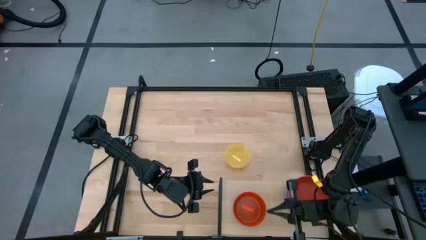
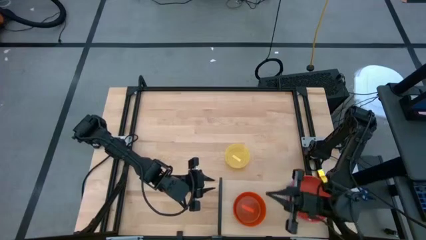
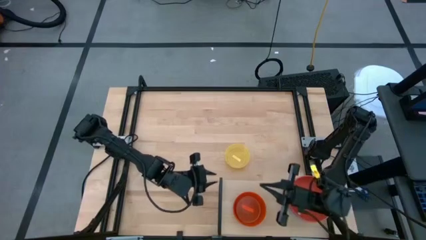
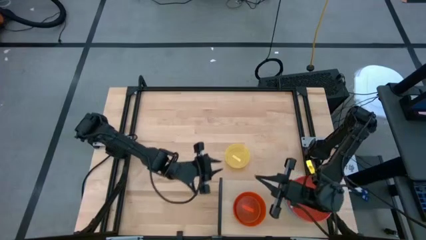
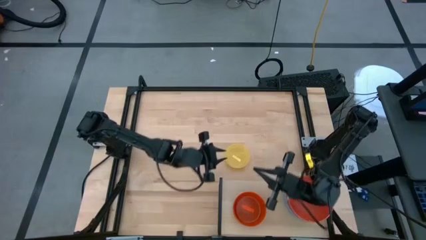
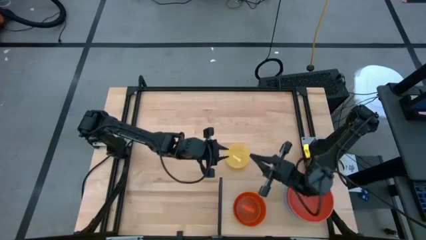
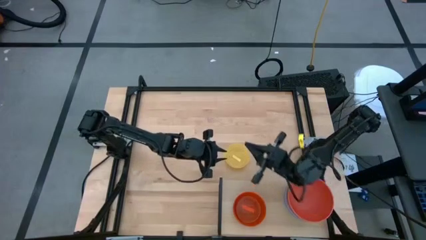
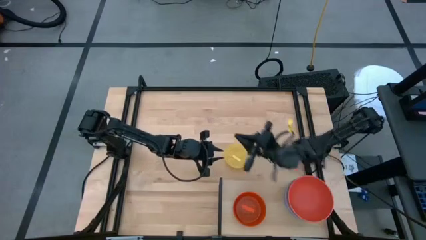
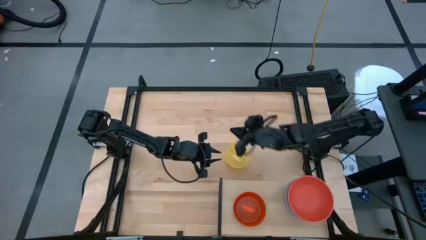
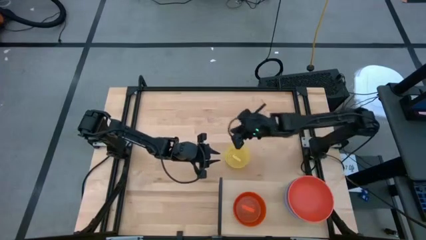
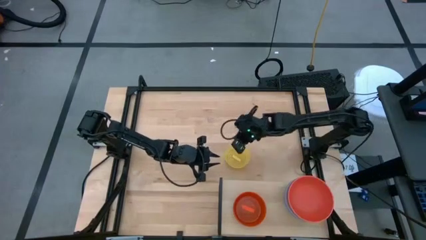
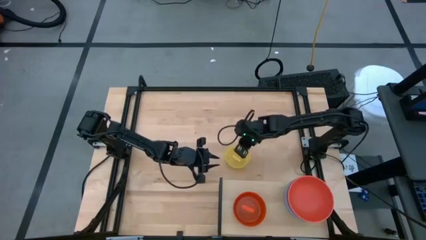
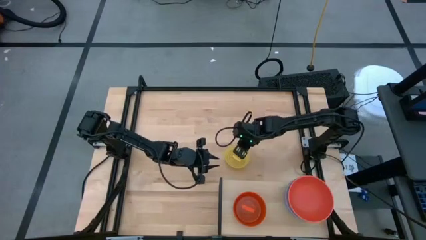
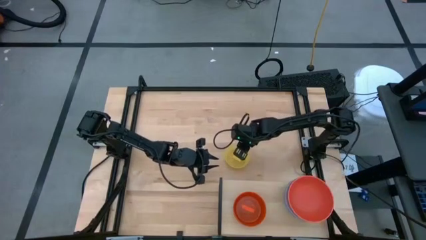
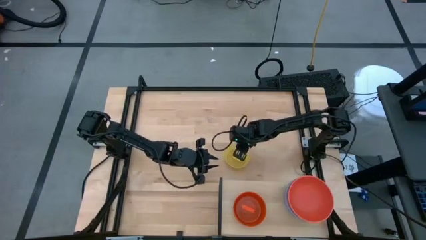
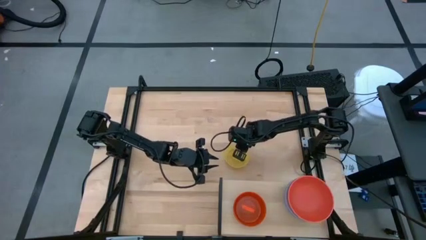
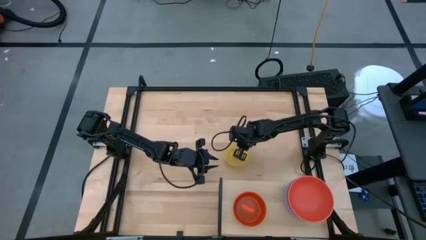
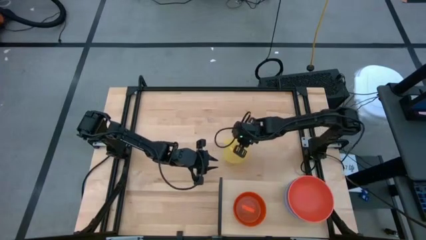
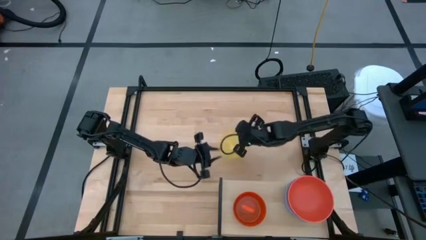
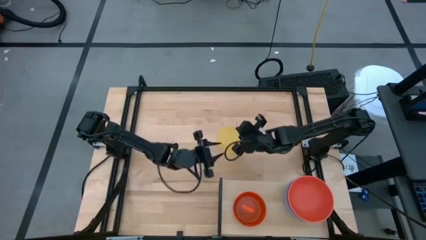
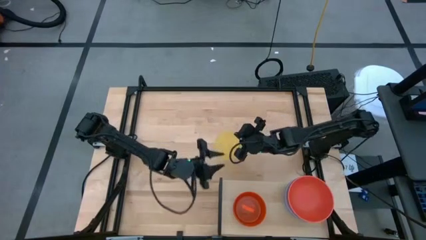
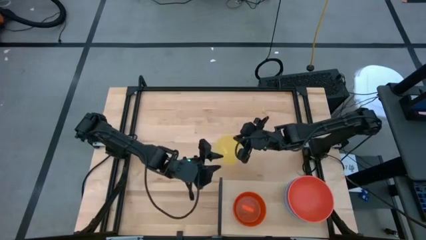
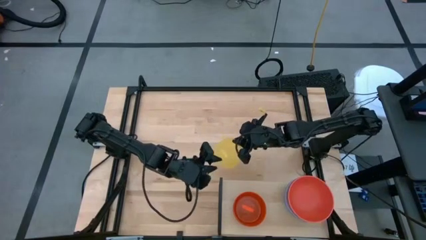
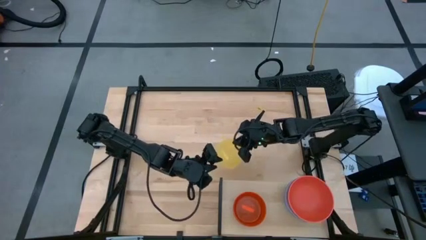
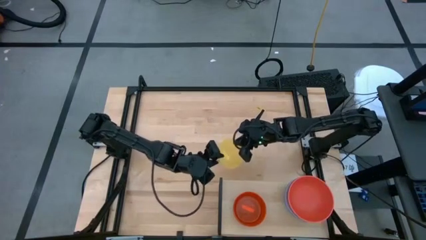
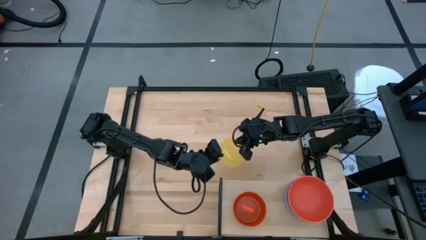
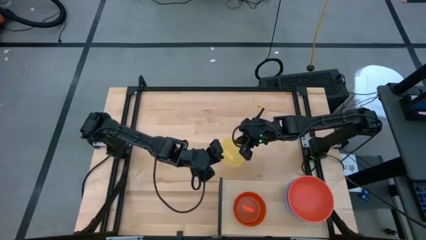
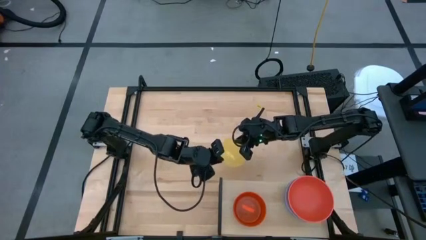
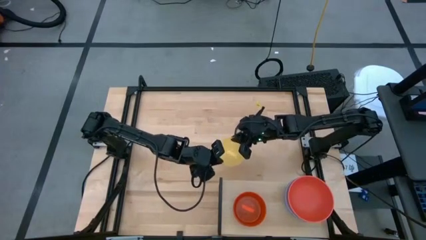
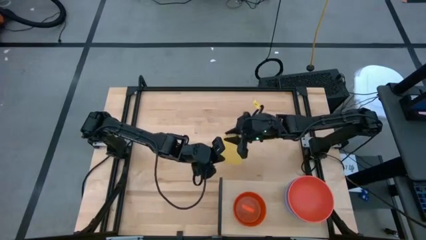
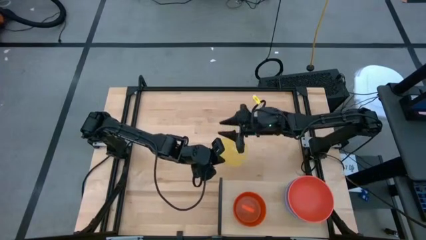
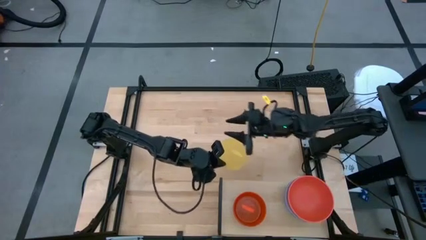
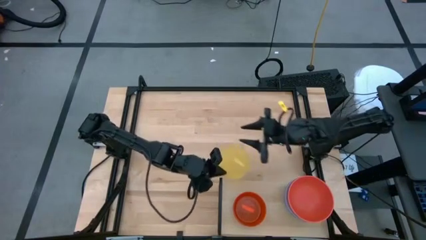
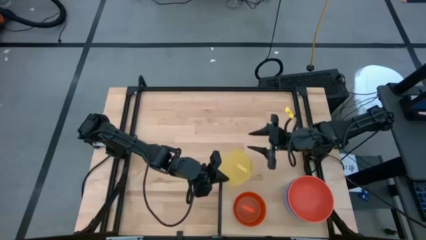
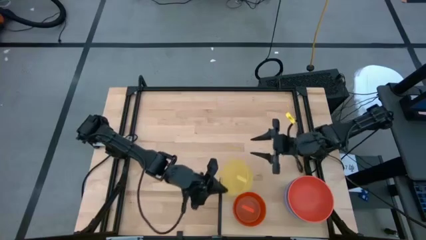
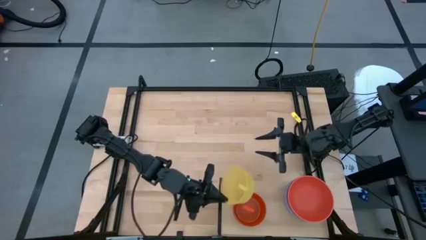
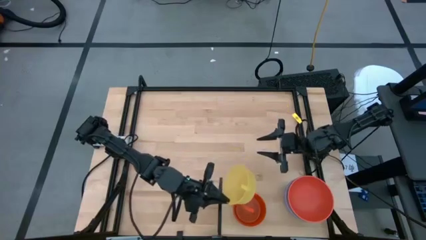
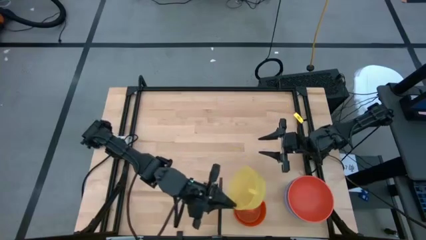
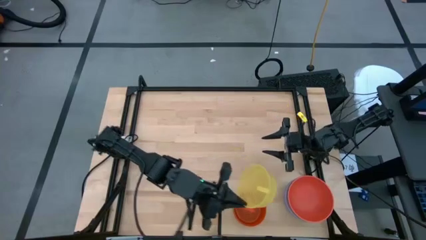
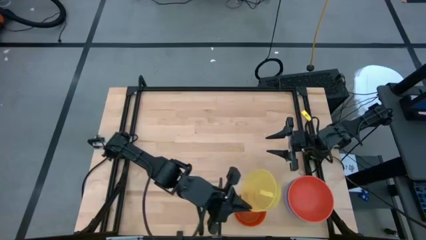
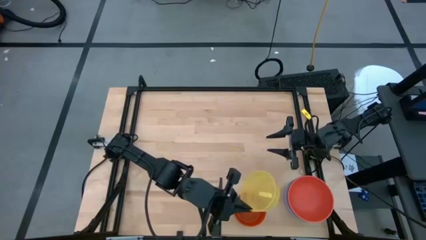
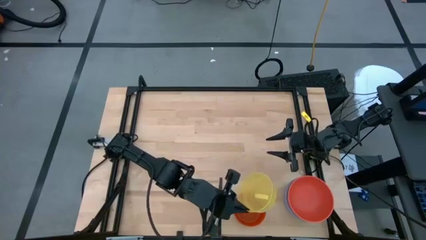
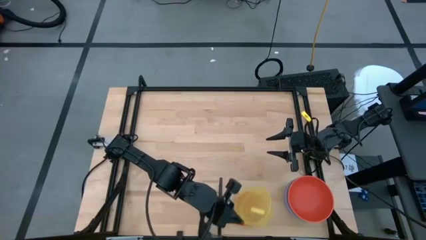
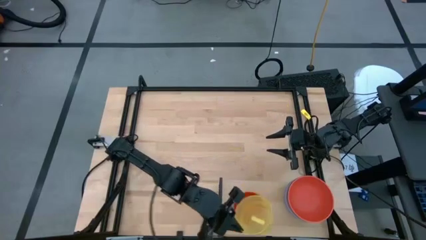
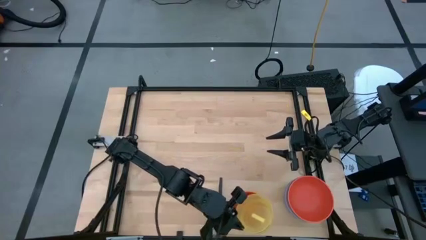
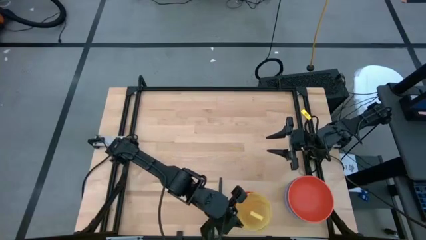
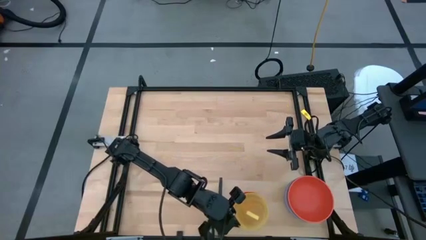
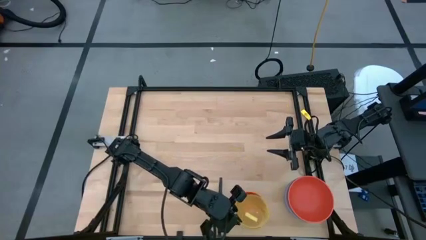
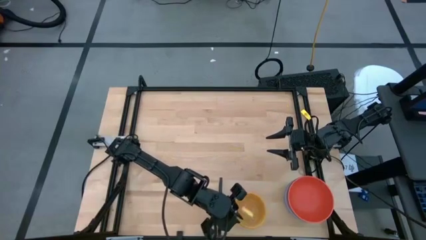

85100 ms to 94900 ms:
Task: Place and stack bowls onto a shelf
Stack the yellow bowl on top of the light orange bowl on the shelf

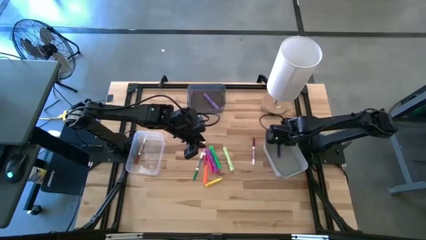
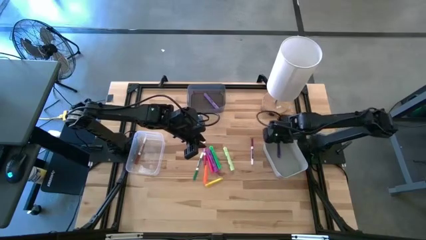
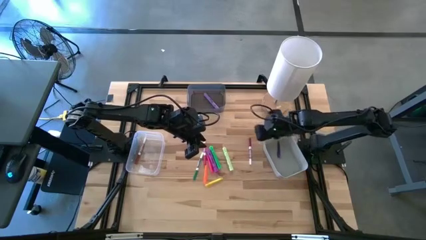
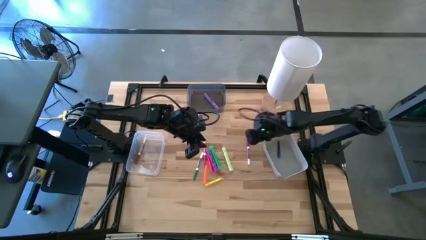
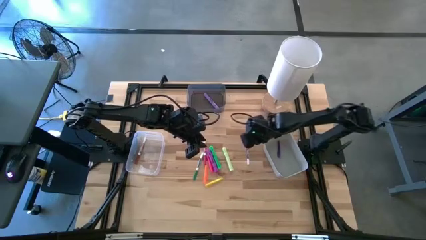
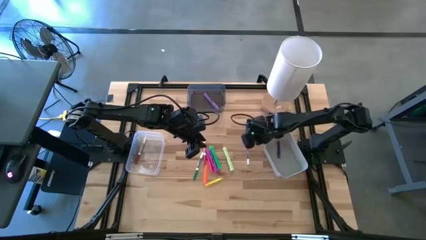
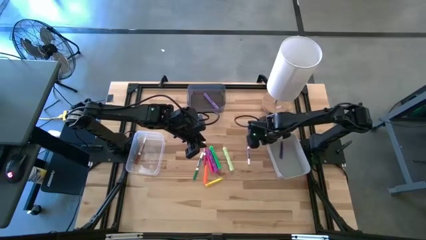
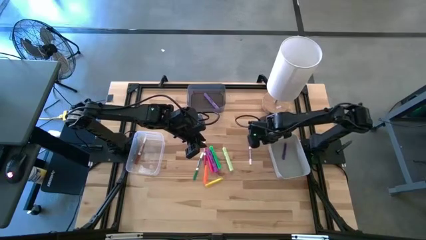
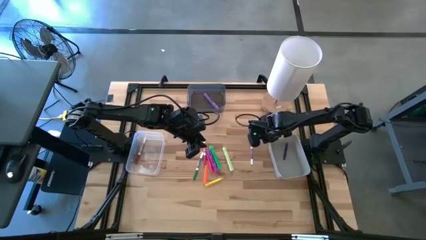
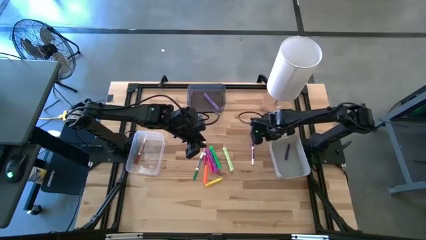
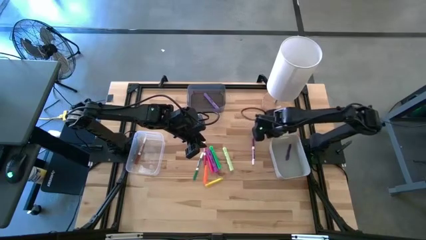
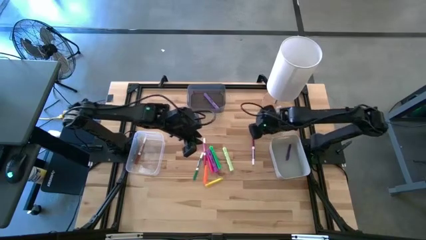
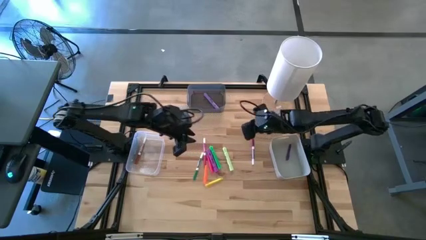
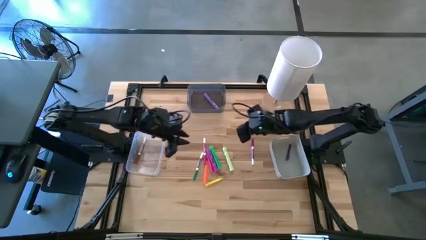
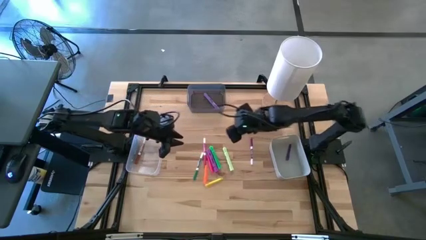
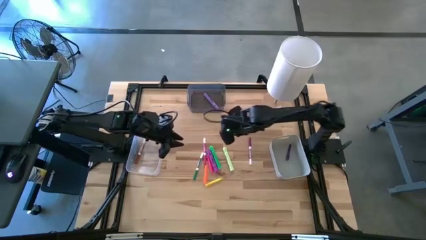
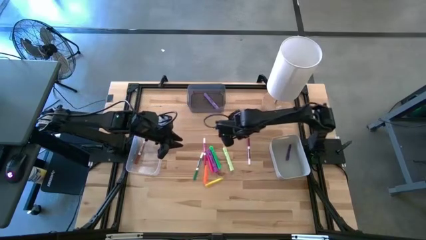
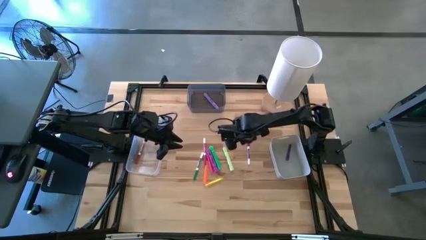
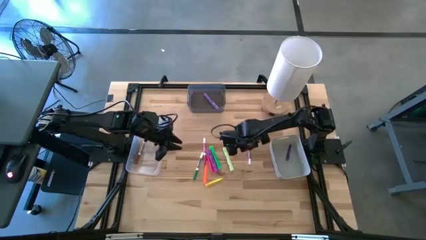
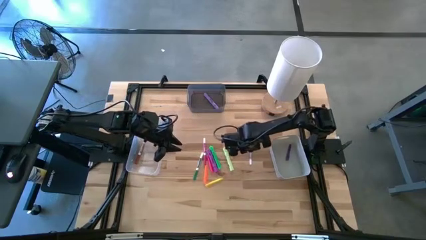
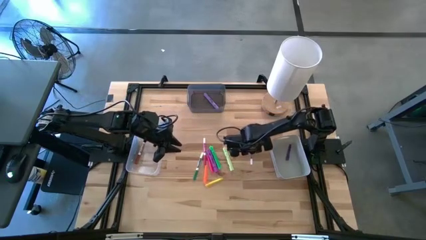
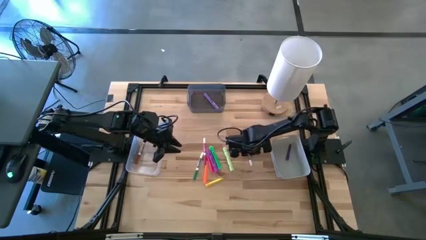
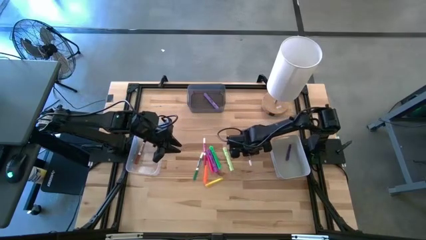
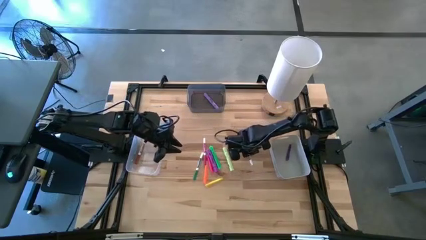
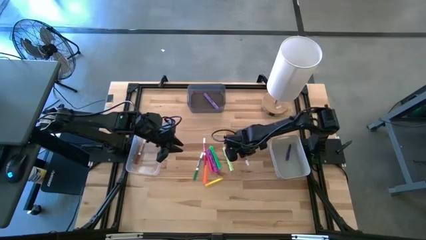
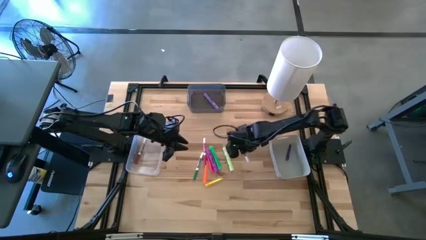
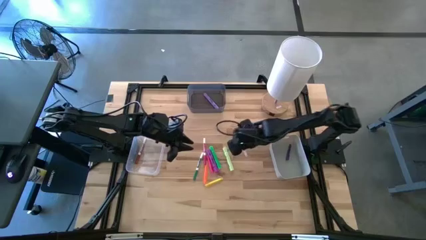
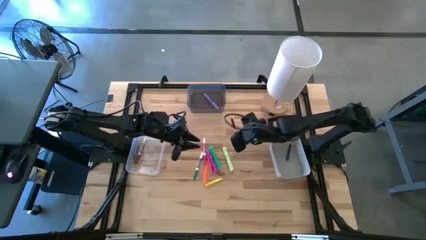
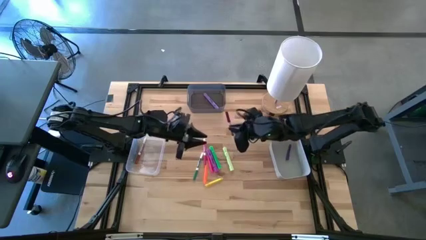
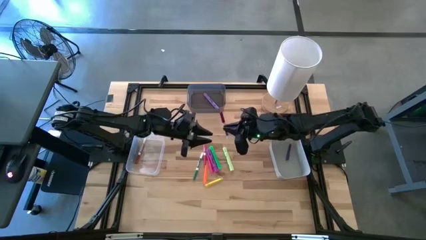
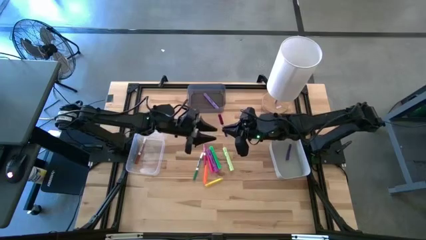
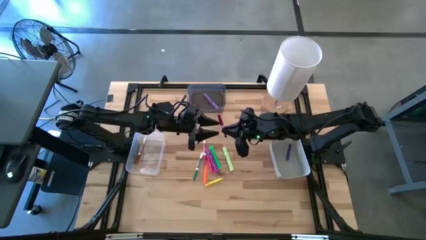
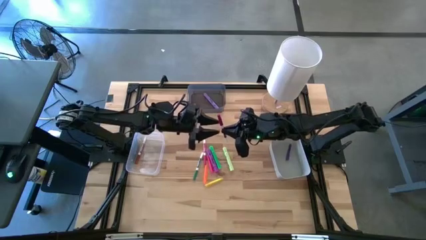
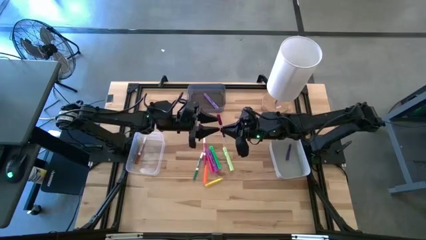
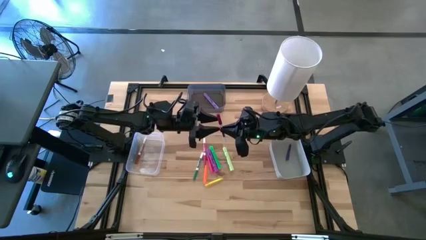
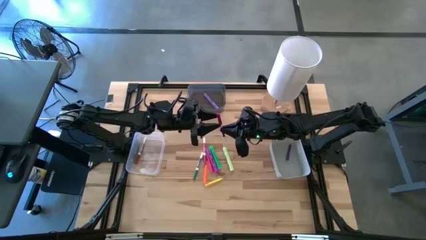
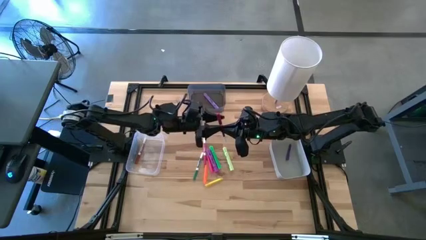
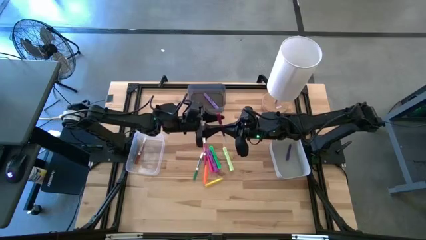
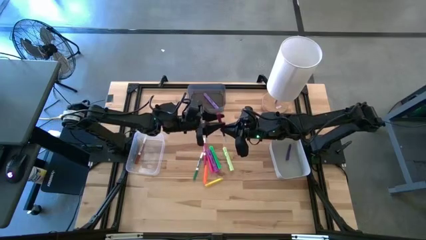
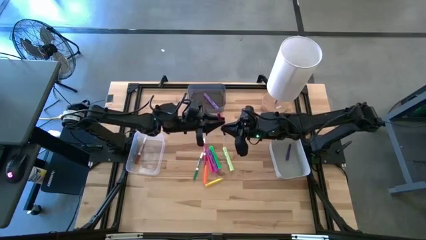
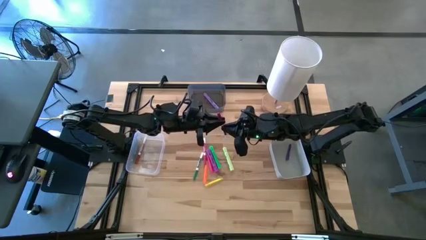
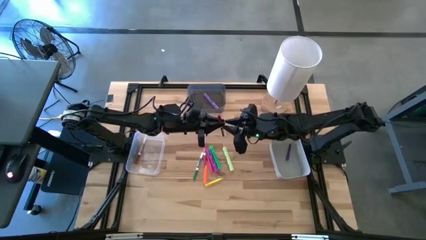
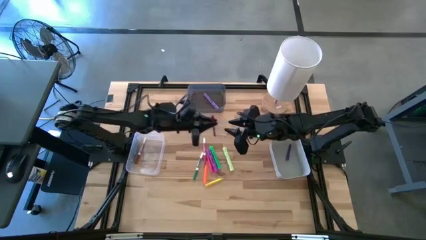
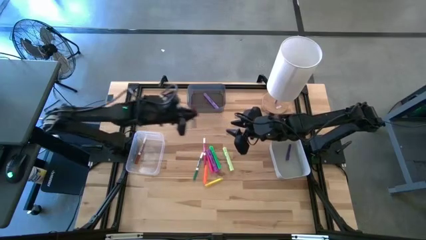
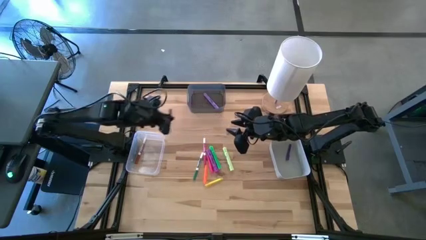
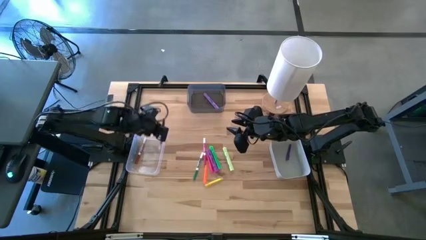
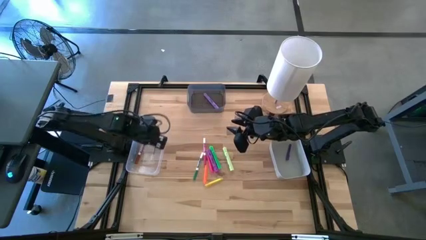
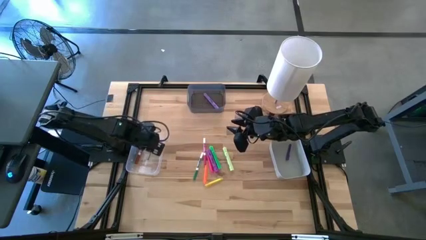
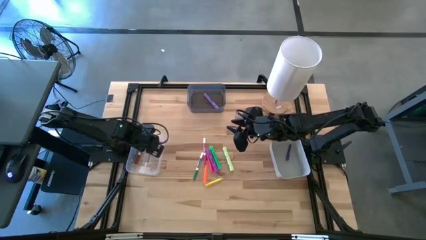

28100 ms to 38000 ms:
Task: Pick & Place Markers
Put the white and purple marker into the transparent bin
